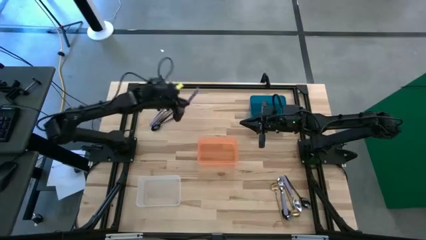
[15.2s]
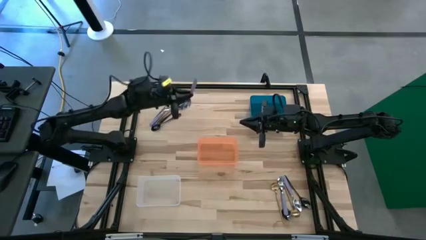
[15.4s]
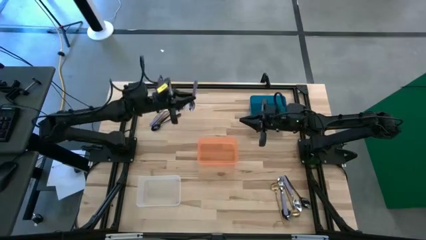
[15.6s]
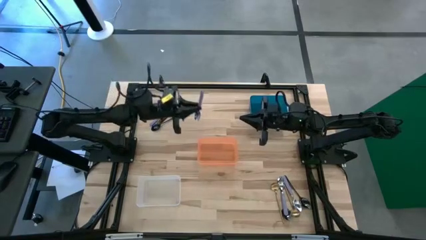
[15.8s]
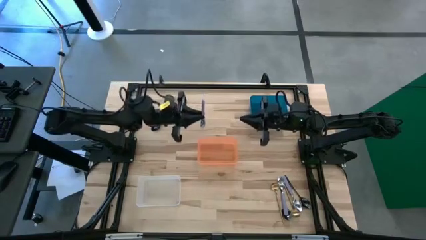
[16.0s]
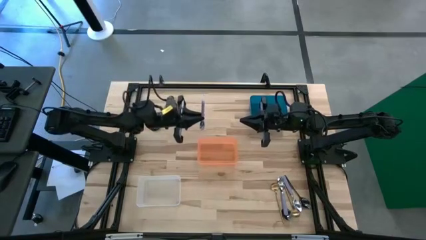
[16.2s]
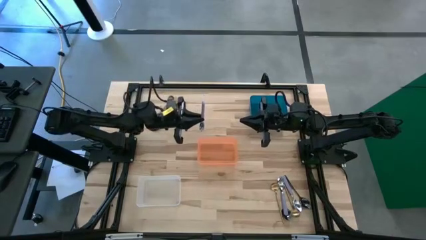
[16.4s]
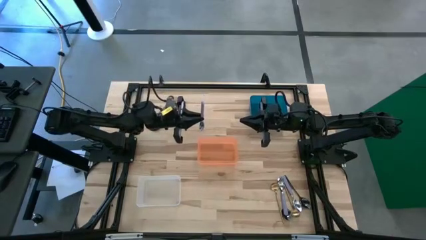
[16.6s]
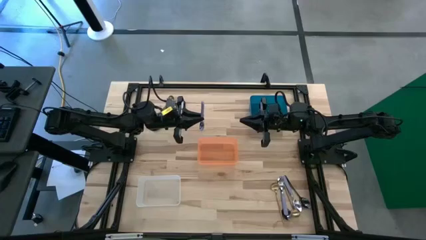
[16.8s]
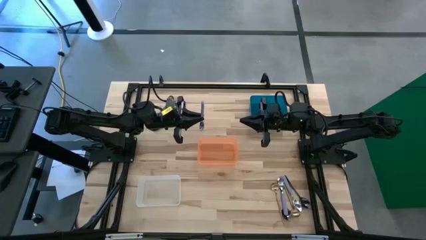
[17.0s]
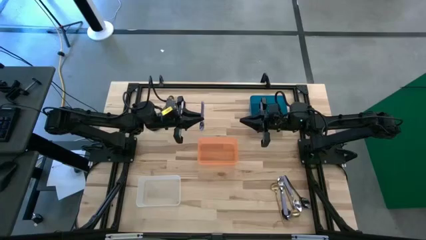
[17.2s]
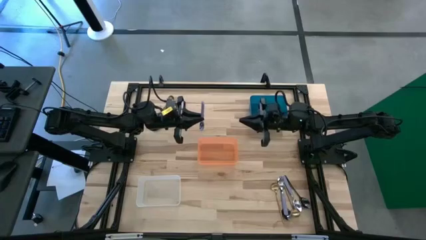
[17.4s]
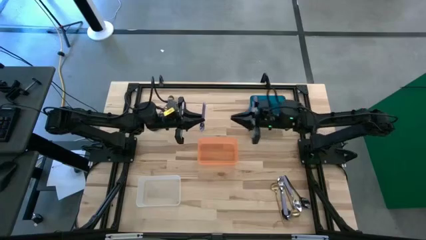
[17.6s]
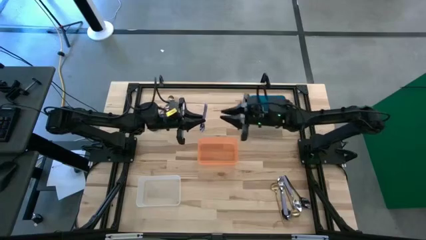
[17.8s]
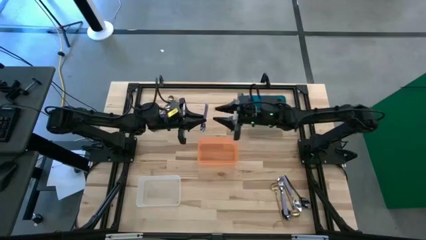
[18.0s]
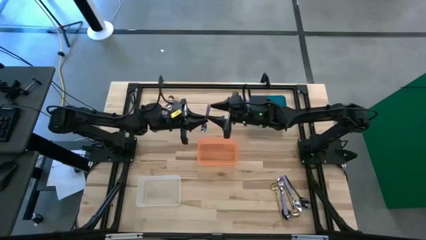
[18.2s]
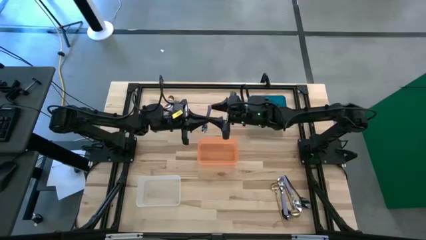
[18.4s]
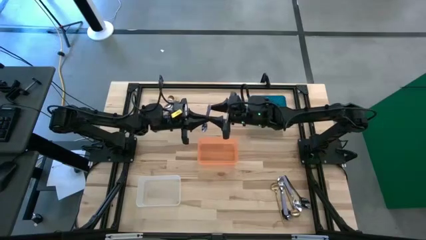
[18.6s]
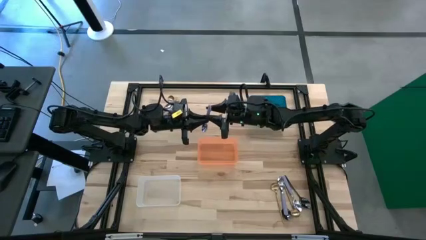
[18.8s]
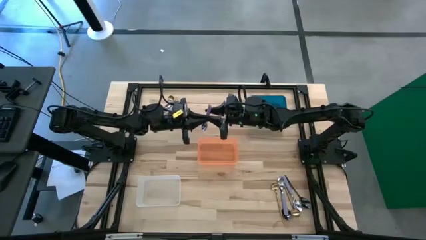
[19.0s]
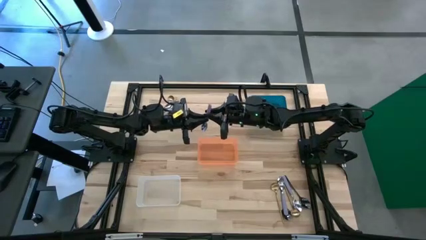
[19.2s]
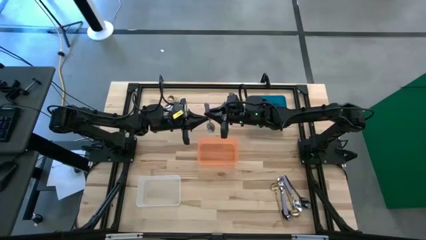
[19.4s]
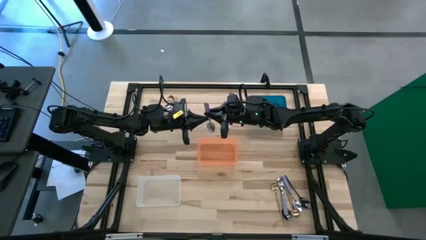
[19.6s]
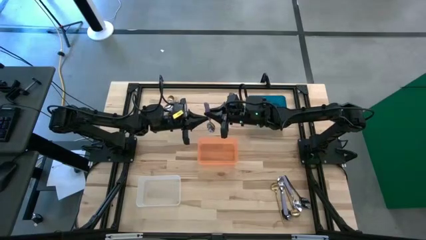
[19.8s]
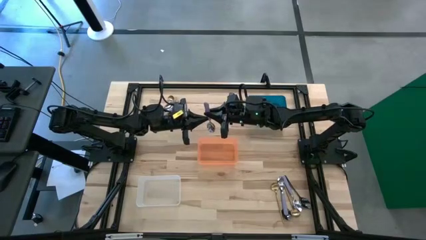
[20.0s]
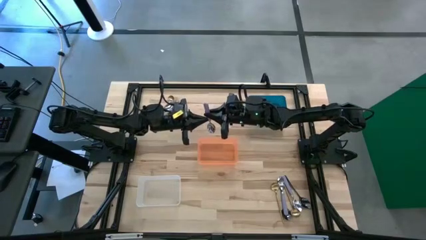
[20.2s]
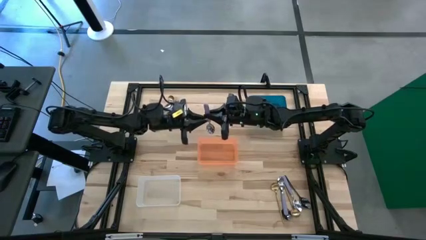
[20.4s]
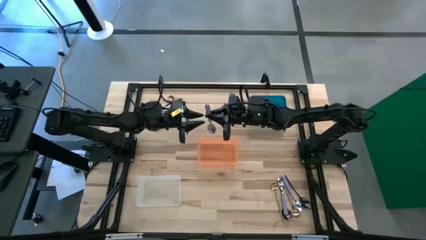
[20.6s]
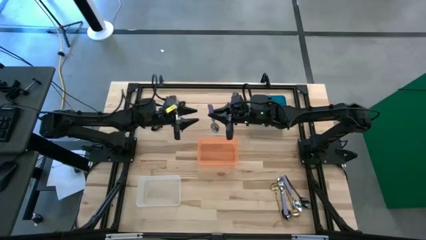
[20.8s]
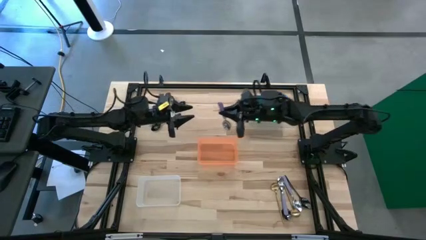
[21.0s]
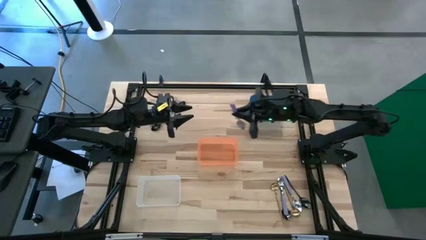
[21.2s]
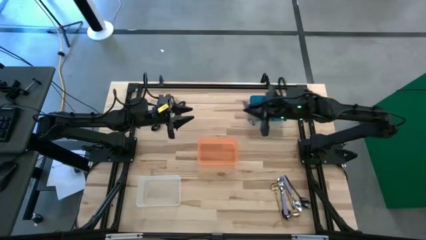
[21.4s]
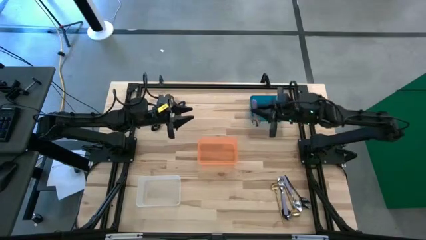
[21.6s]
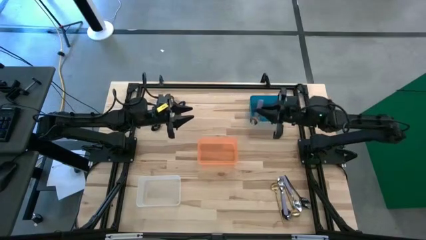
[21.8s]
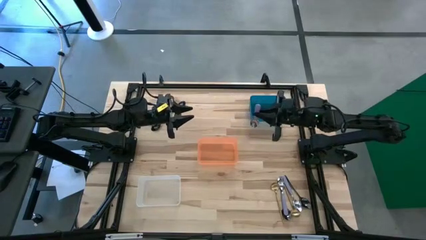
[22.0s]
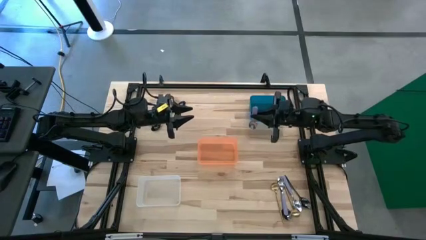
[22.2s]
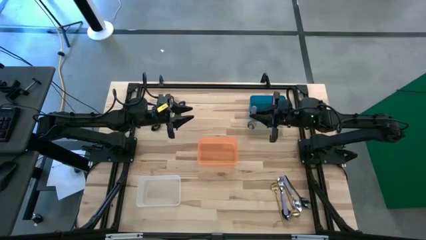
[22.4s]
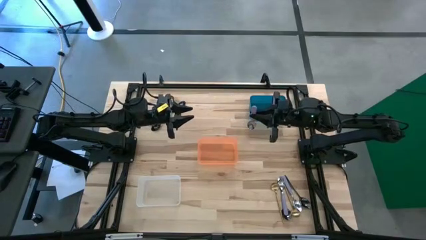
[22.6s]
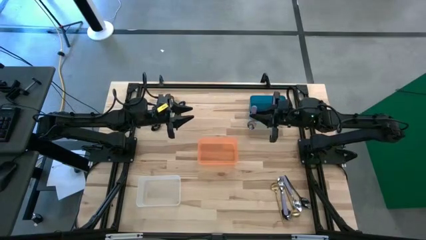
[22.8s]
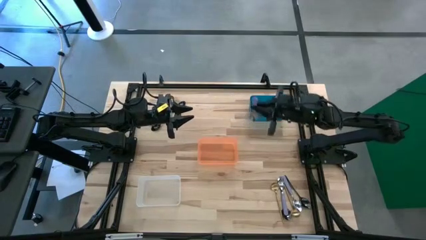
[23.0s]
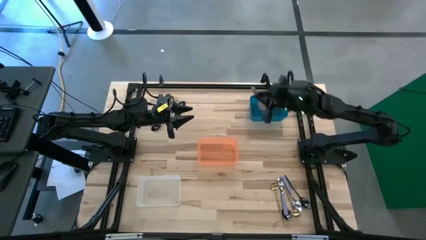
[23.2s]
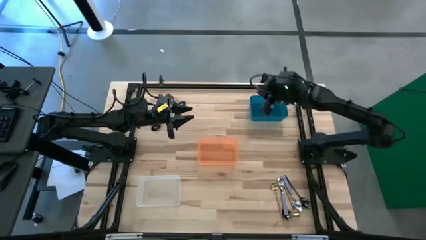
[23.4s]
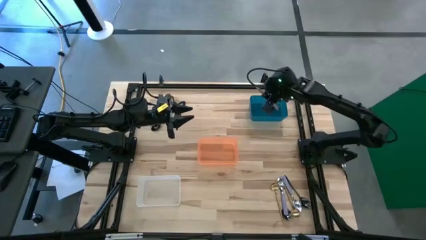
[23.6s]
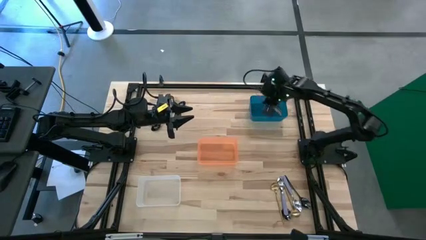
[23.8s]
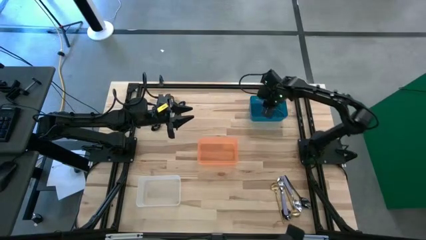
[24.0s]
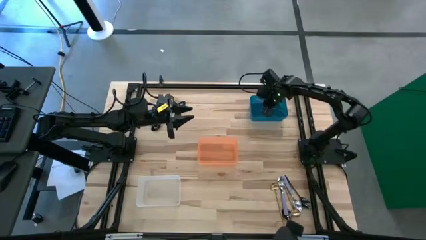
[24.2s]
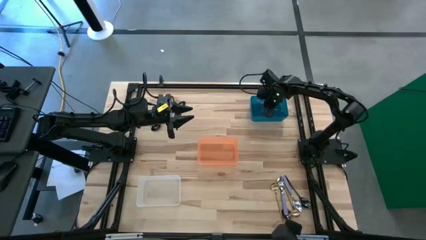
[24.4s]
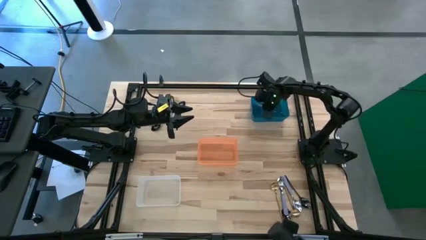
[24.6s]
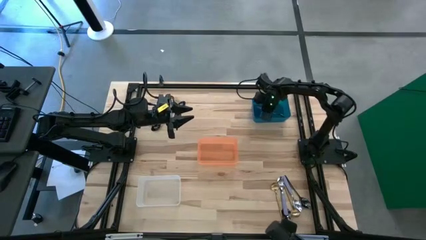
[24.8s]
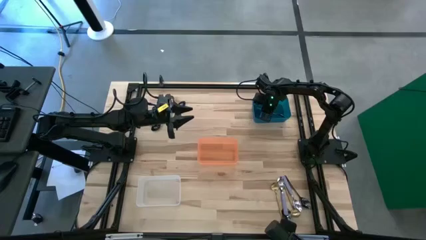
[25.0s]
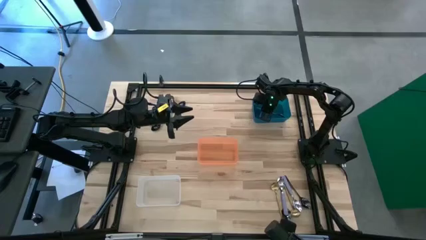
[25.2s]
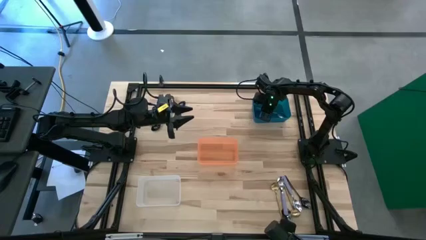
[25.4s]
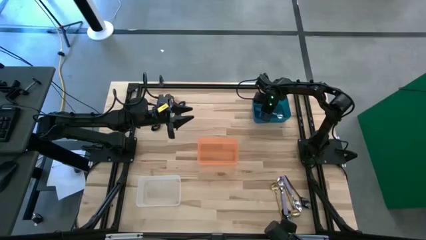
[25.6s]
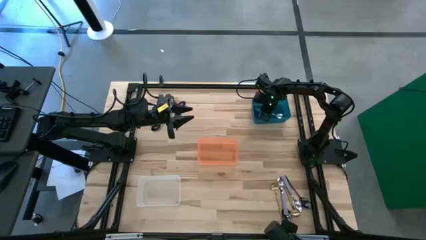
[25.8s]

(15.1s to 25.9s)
Task: Sort silverware by color (type)
Put the top right violet spoon into the blue bin

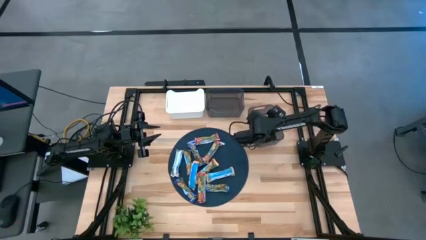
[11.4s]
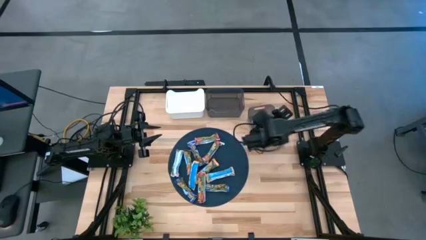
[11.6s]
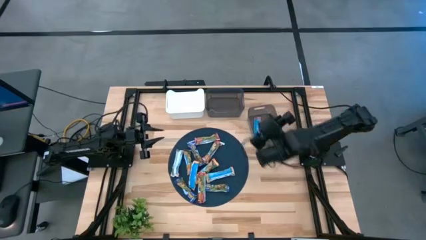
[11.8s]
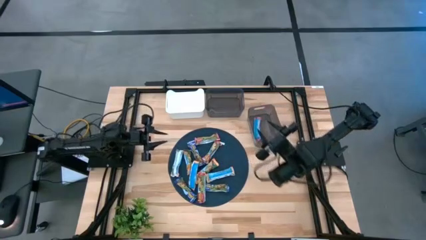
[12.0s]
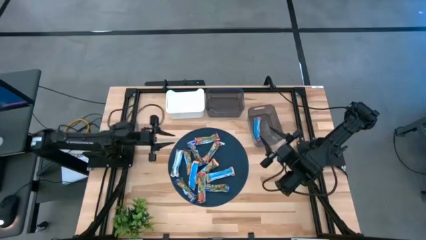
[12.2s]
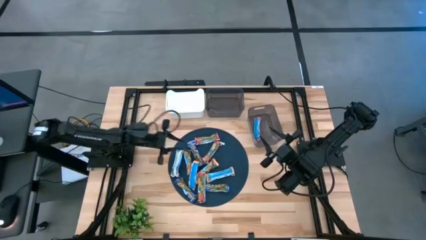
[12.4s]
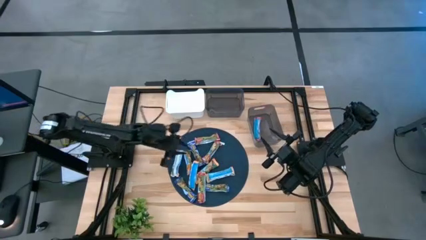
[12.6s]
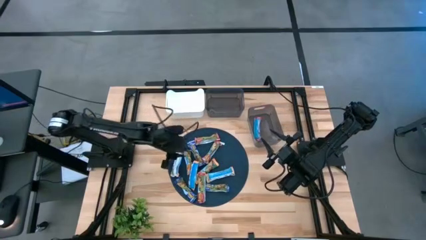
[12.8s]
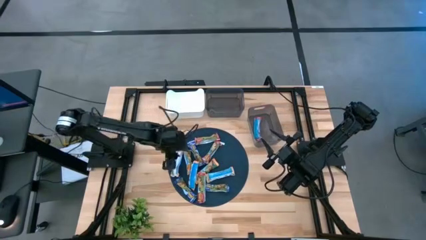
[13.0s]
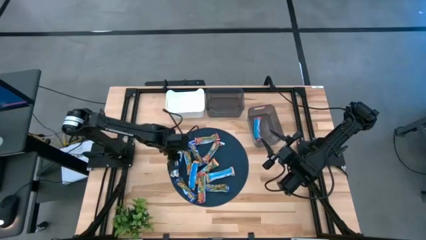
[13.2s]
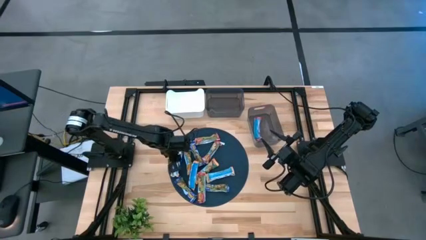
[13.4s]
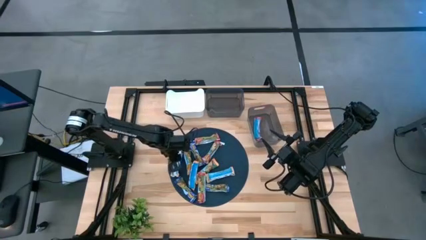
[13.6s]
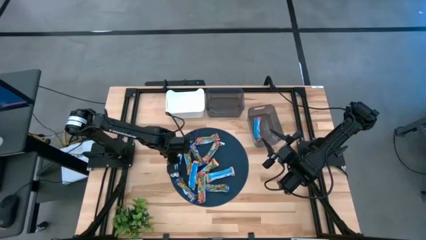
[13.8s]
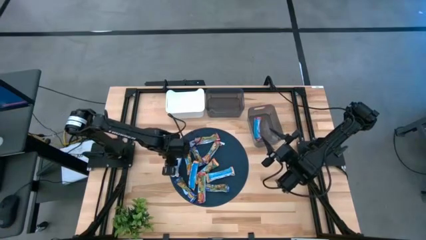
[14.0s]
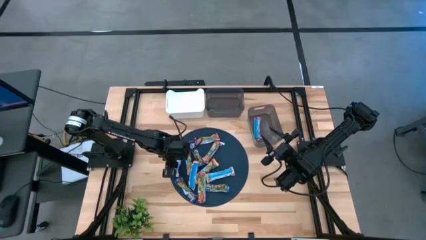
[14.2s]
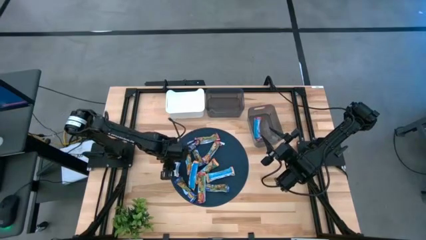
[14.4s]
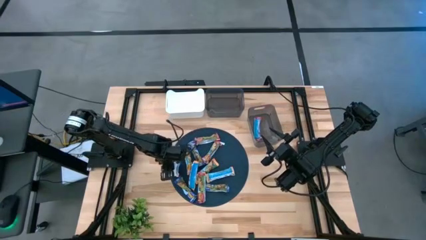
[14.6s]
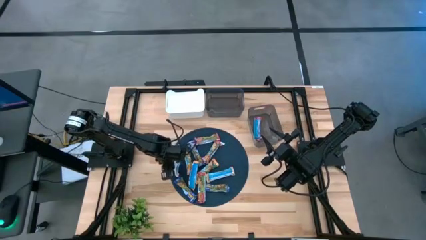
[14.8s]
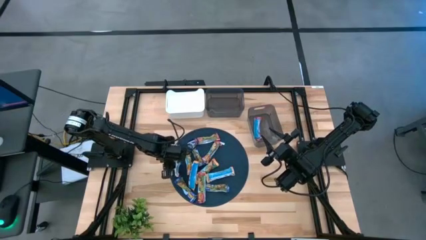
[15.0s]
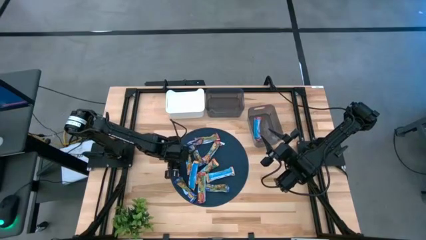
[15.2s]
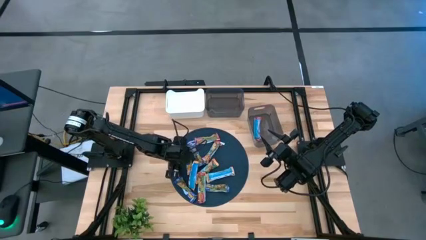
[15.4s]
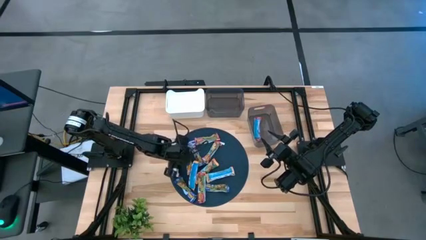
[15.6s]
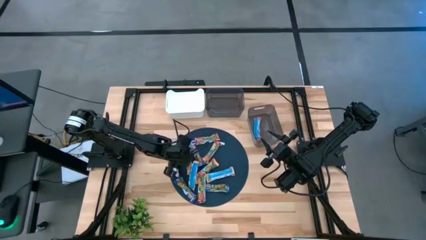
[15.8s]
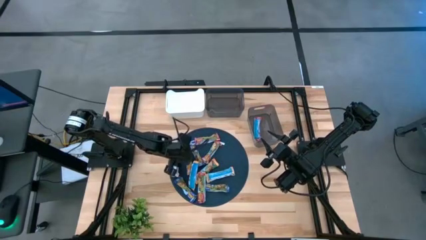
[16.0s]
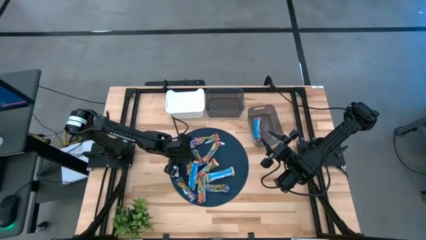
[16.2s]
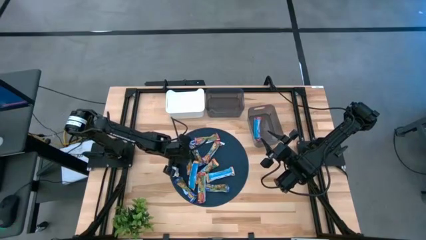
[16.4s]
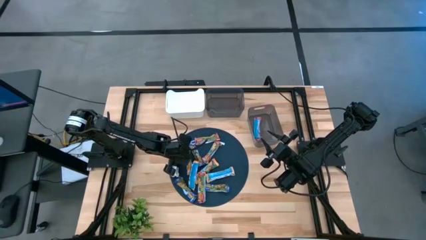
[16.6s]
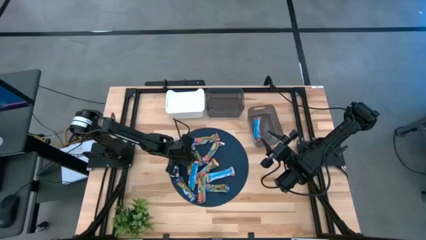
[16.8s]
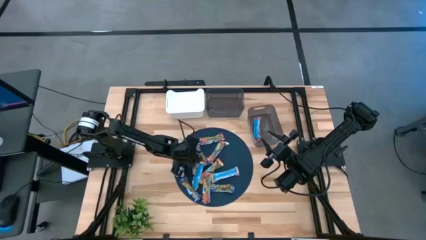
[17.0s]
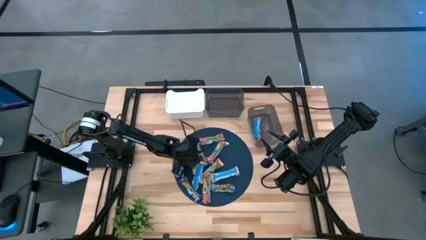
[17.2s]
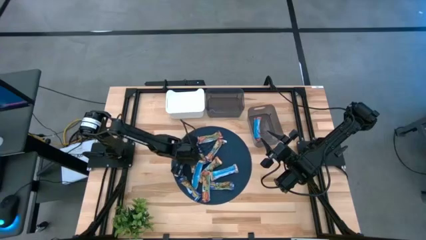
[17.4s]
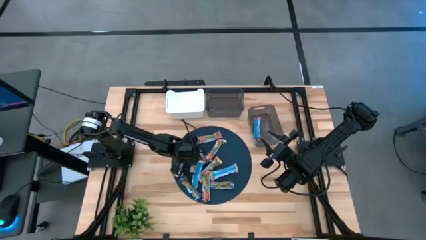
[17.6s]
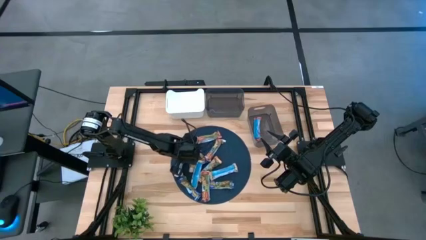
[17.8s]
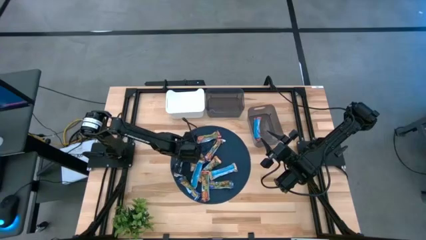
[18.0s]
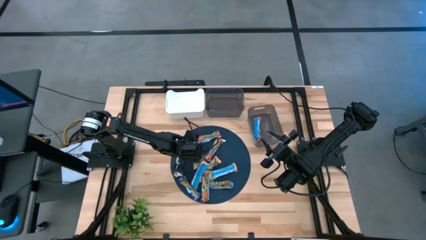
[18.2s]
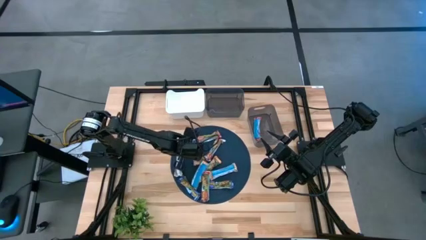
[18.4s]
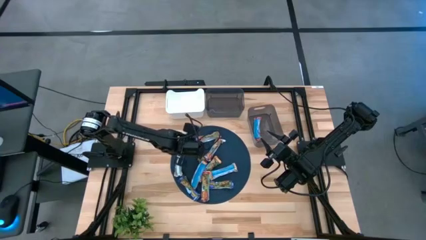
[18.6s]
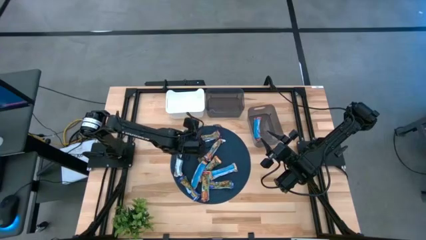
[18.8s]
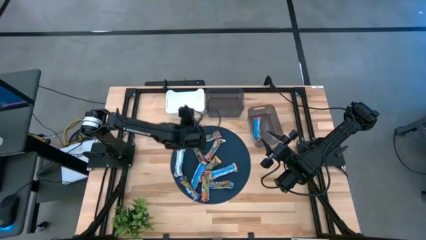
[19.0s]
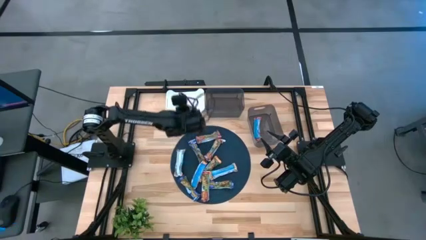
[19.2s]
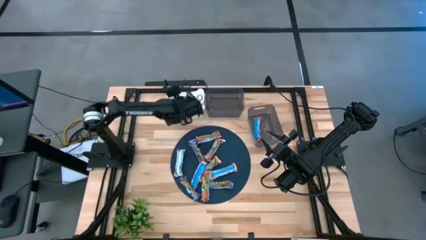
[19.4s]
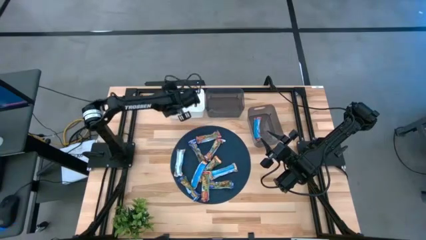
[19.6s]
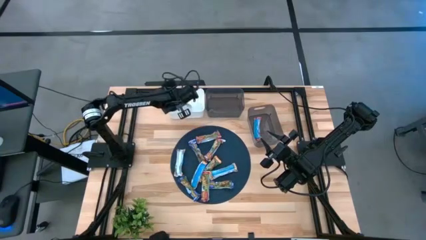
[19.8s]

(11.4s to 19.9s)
Task: Pick and place Granola Bars by type
Put the yellow granola bar into the white bin
